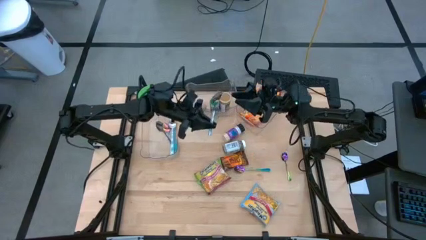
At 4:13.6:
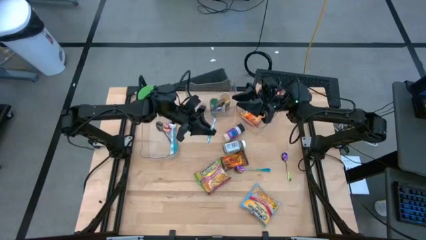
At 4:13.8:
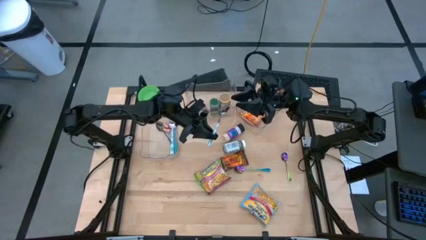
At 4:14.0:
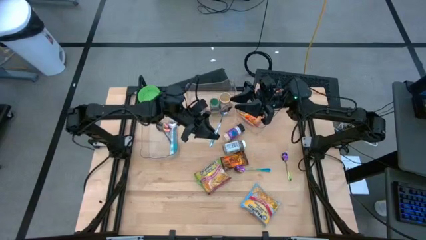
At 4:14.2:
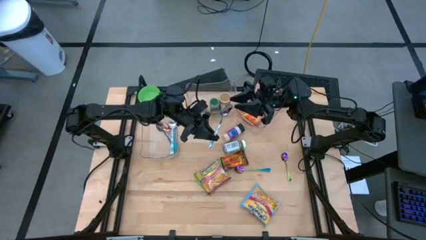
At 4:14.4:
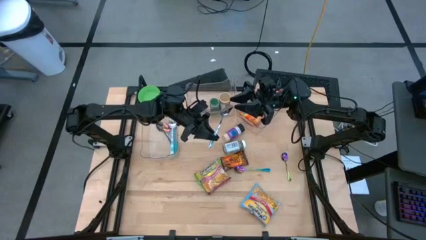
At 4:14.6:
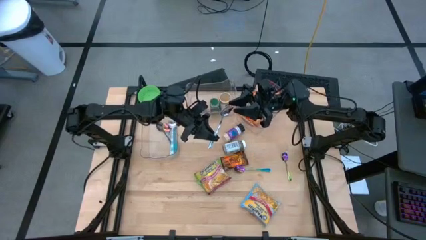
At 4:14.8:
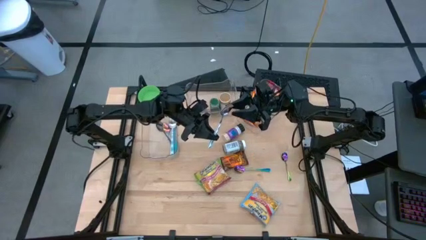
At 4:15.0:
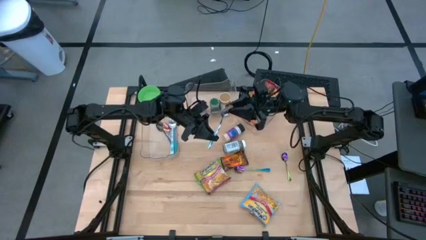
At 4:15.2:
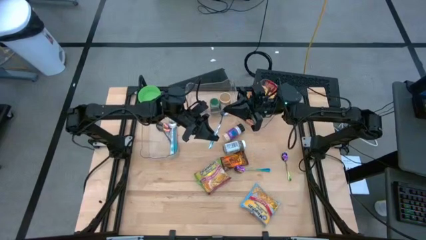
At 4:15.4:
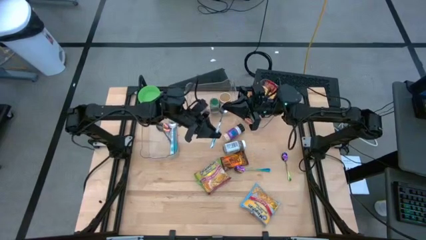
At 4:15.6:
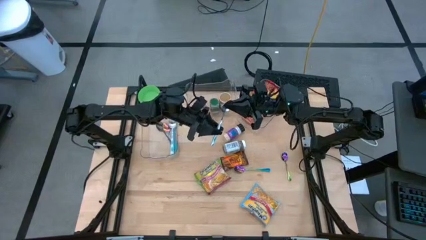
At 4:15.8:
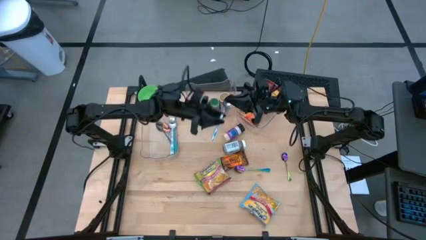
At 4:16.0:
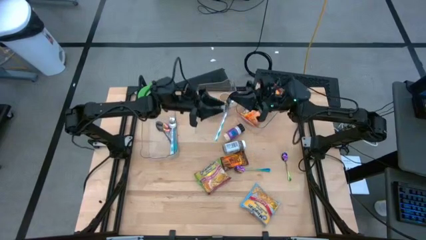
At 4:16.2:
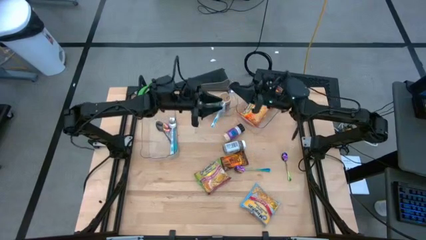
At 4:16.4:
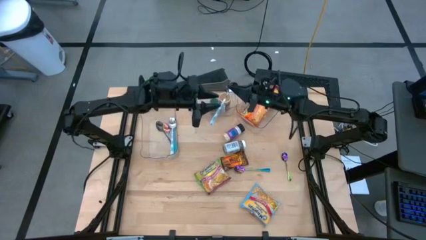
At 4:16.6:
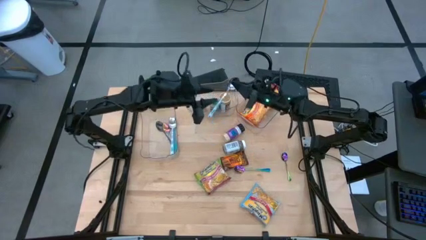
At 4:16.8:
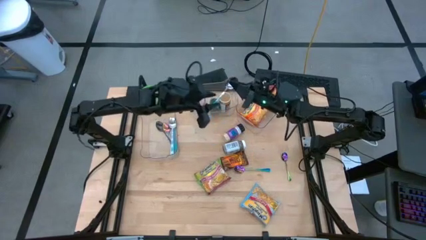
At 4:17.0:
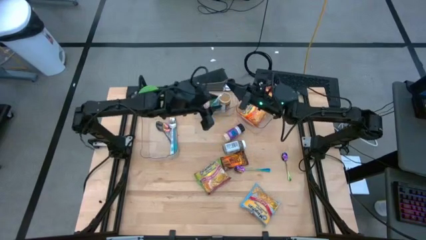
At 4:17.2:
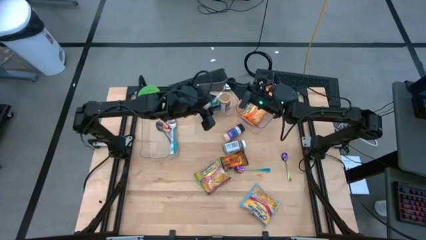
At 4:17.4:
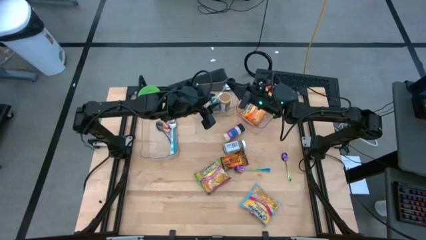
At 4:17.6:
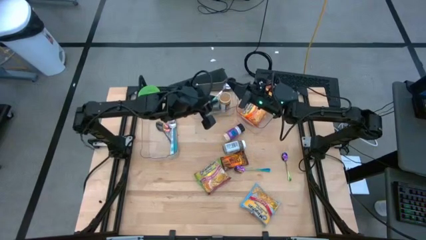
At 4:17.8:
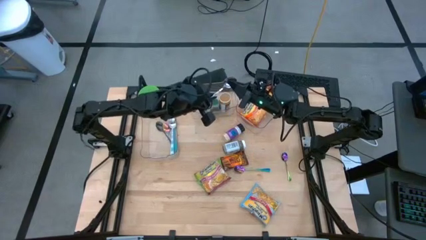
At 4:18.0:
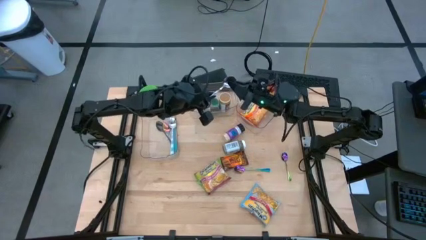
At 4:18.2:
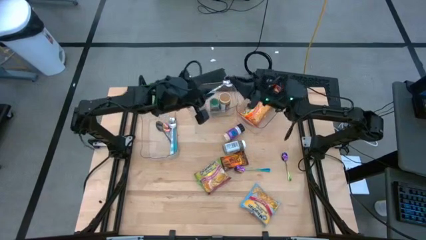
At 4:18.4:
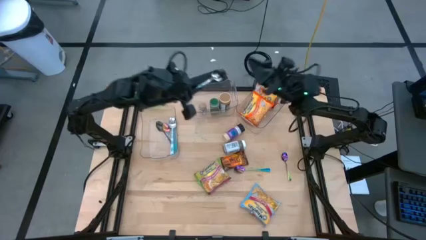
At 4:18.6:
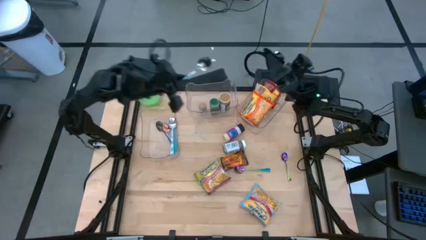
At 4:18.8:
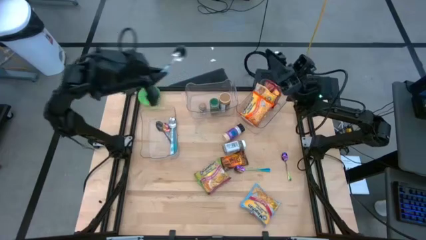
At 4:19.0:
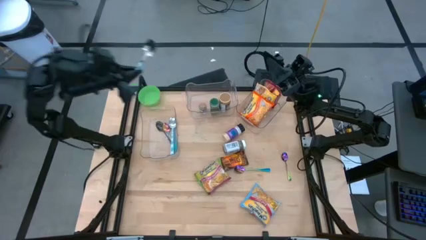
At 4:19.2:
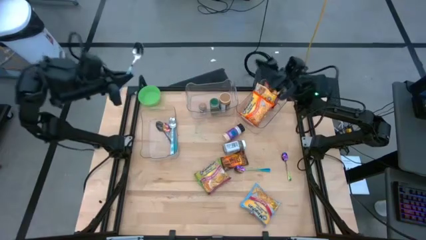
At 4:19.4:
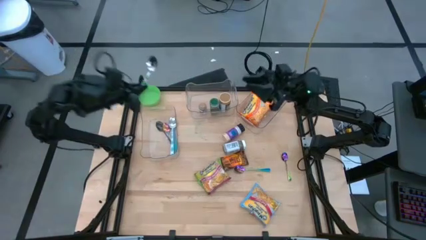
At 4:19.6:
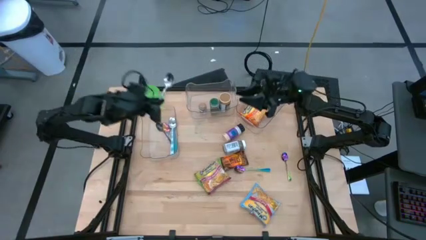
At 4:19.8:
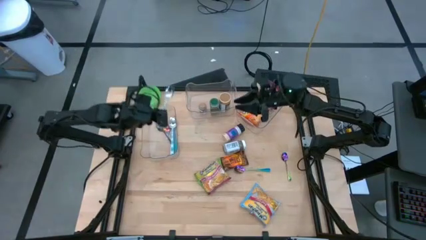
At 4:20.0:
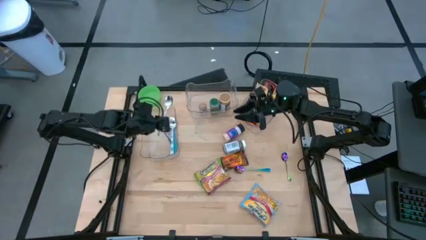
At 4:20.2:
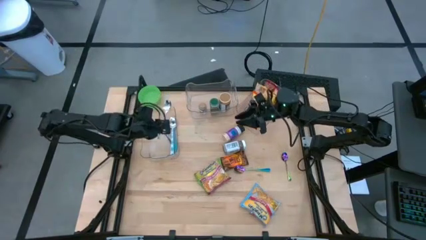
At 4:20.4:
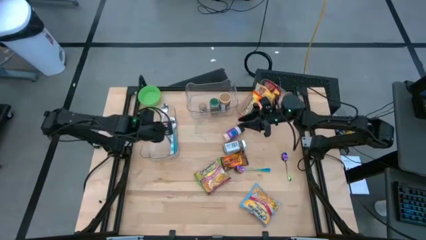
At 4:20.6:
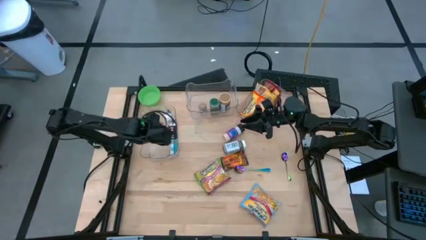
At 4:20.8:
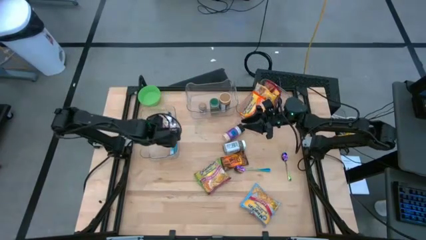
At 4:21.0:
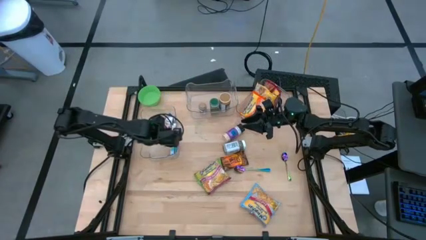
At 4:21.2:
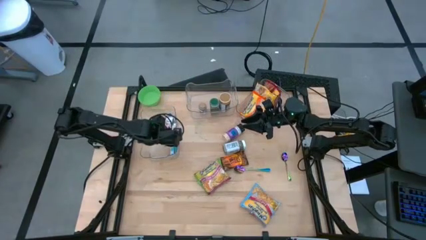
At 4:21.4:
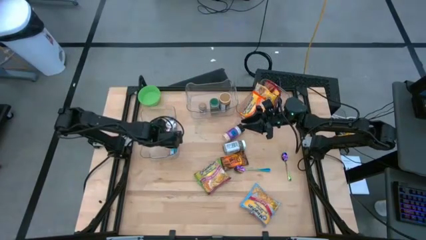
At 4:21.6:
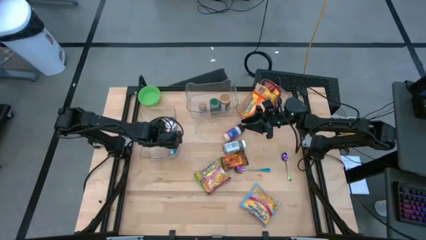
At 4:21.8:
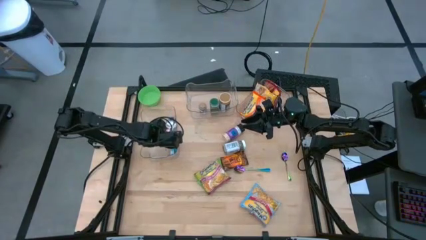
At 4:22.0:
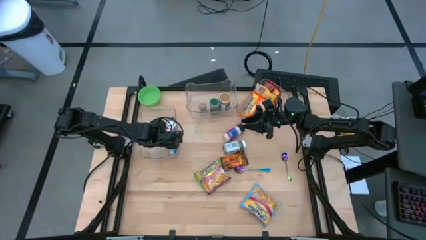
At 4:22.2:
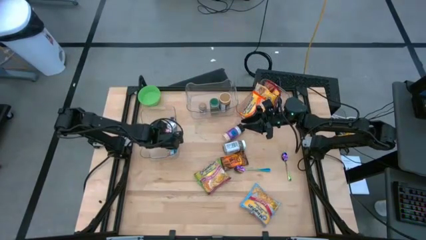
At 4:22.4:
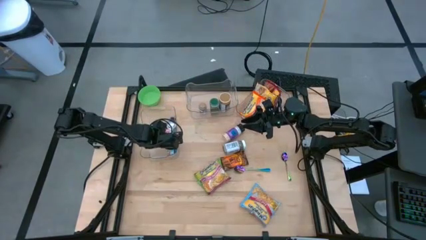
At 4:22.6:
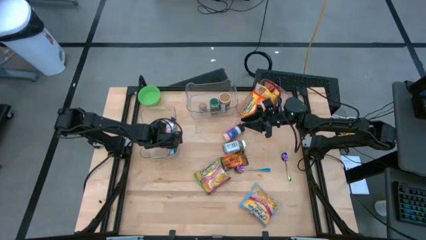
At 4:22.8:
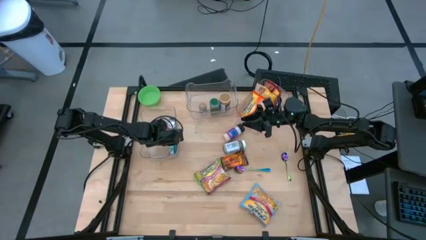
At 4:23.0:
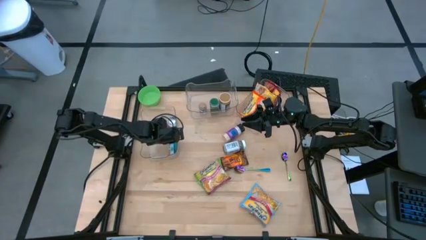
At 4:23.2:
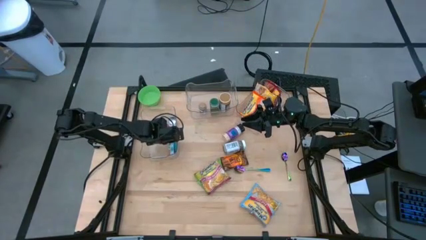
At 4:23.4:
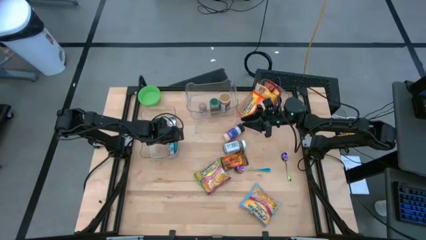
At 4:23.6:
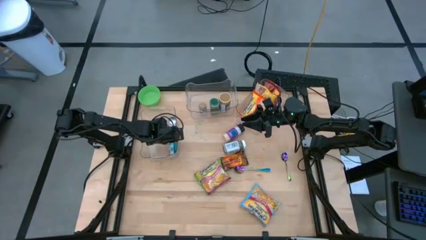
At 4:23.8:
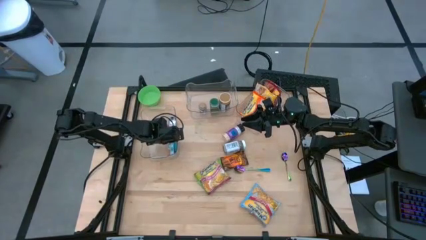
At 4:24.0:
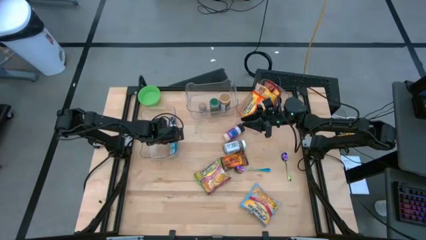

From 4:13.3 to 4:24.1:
Task: Pick & Place Food Item
Put the white patterned spoon into the left transparent bin

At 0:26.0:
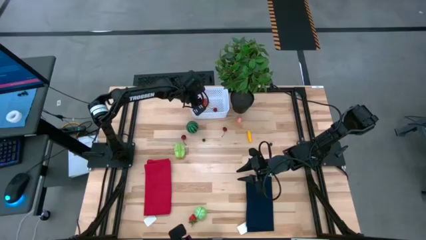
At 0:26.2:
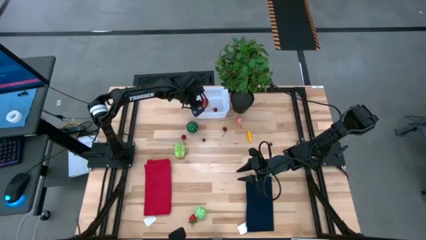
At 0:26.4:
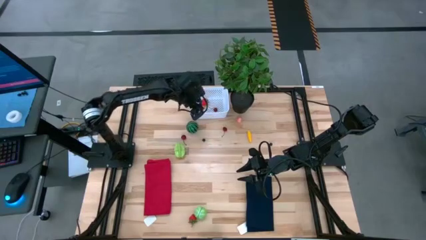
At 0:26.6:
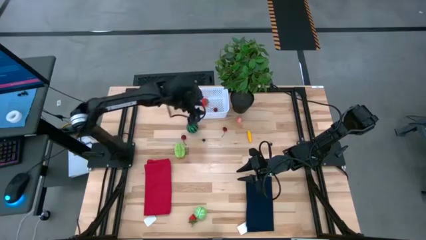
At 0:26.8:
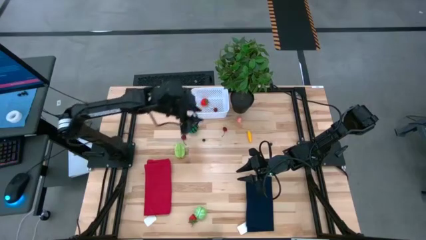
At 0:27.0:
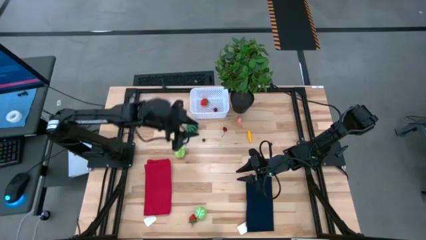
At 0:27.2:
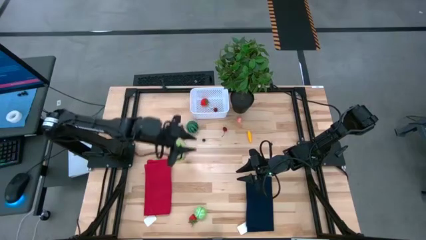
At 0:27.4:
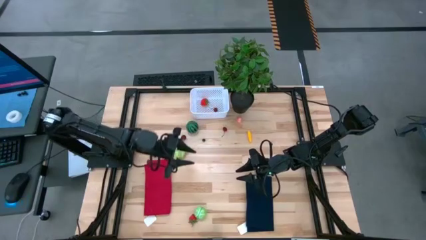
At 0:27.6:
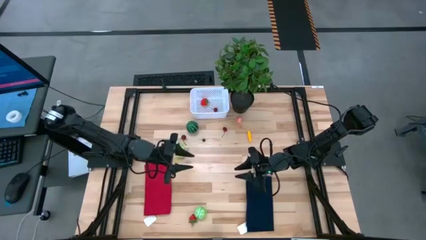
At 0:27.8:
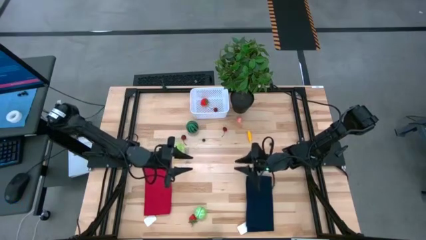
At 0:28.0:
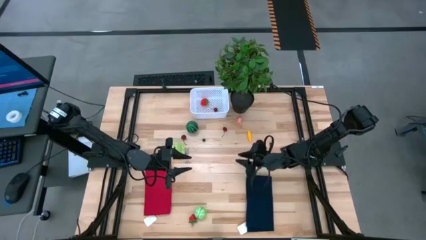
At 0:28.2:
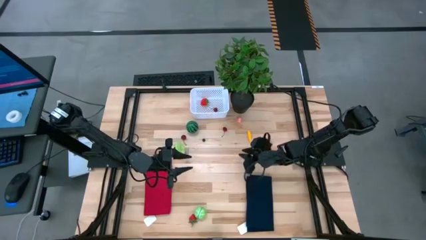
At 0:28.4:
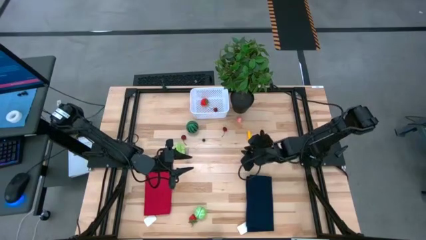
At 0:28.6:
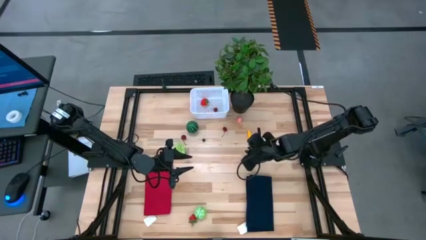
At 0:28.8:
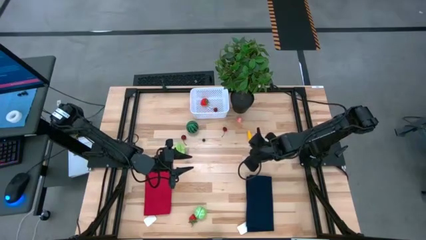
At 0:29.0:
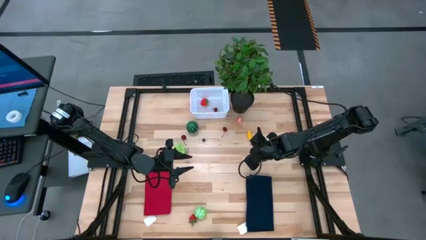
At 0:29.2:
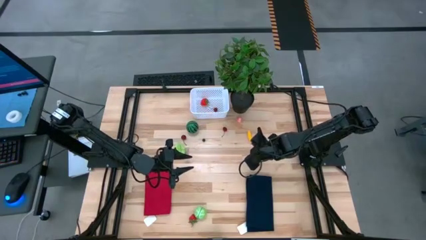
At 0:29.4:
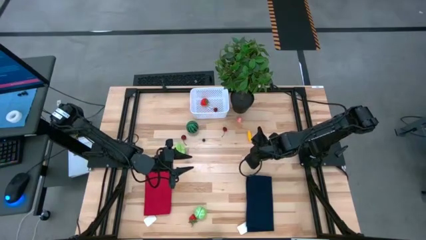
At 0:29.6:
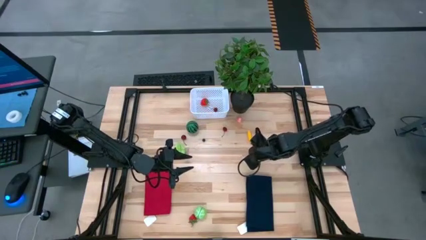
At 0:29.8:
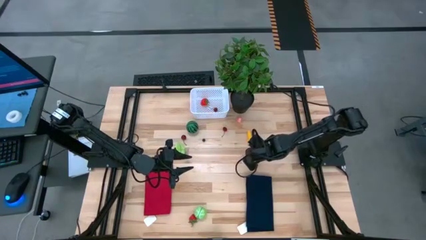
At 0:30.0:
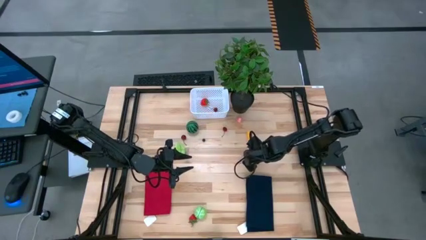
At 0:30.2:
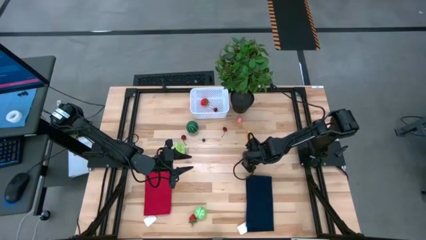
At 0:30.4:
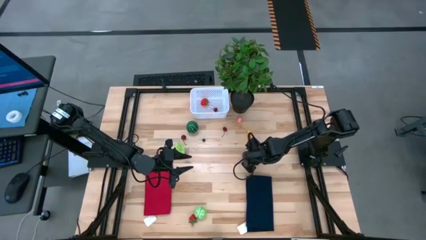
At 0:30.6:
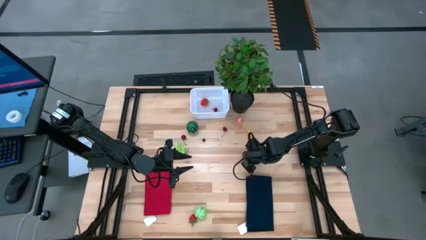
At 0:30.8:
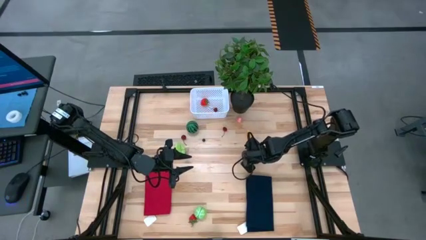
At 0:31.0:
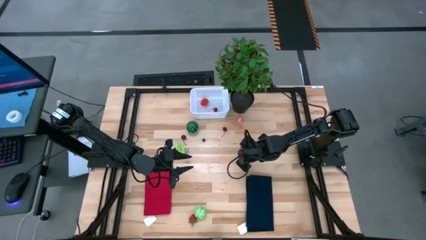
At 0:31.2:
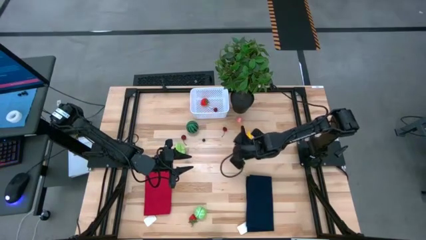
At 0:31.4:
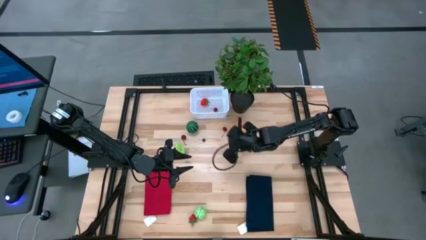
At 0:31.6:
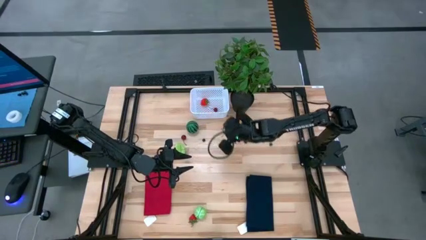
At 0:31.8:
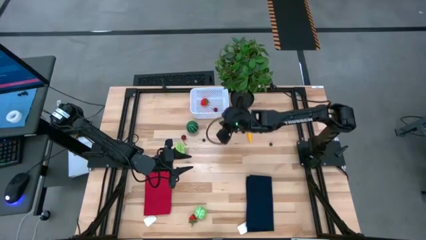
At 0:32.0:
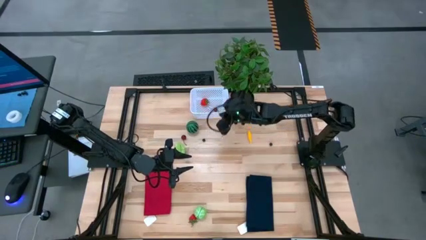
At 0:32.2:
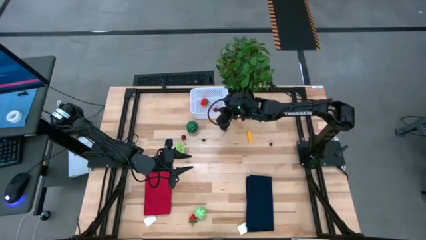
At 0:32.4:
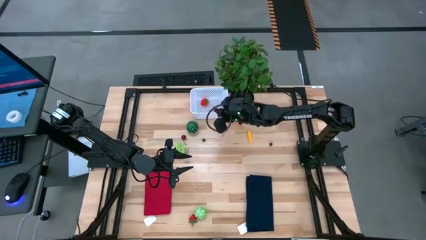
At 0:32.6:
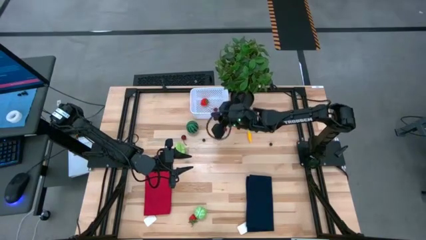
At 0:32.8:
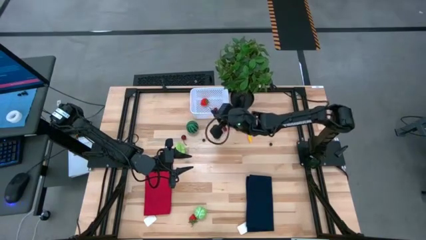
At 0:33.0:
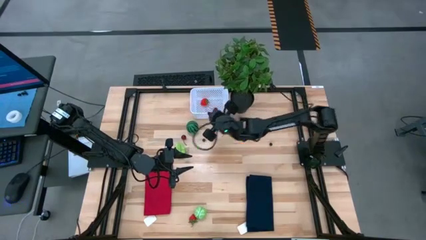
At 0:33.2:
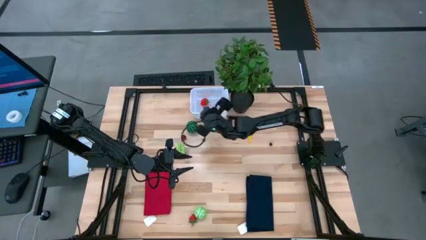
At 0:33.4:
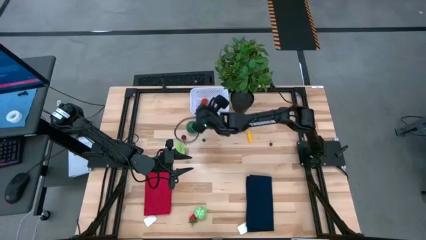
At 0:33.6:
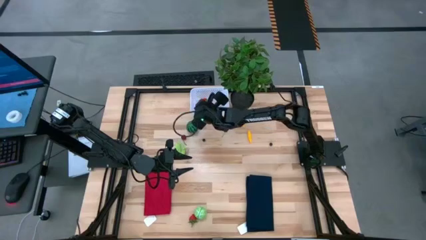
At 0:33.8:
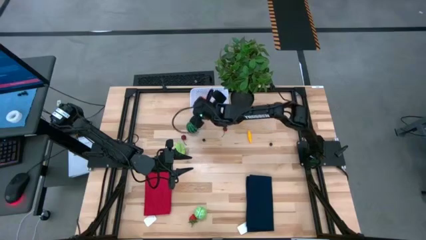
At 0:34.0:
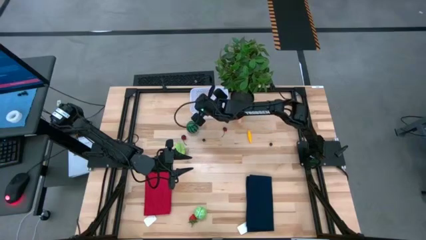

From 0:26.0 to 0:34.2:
Task: Pick and placing Produce into tupperware
Put the red cherry into the white basket
